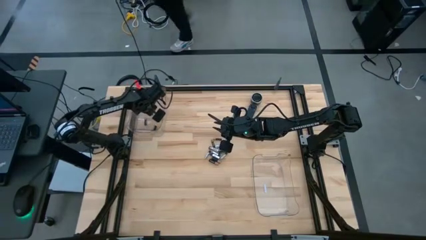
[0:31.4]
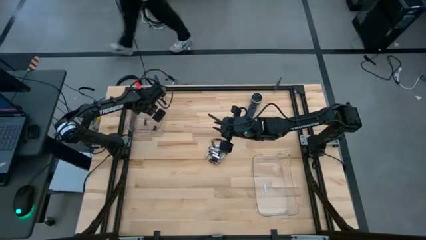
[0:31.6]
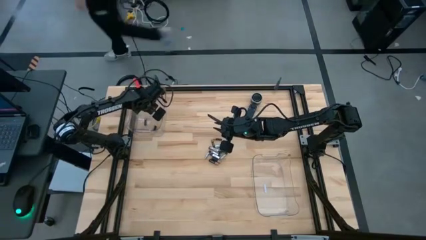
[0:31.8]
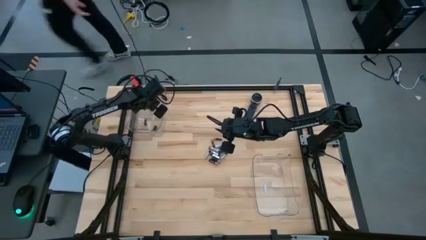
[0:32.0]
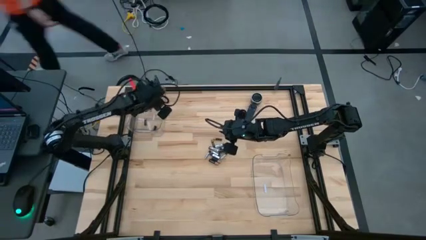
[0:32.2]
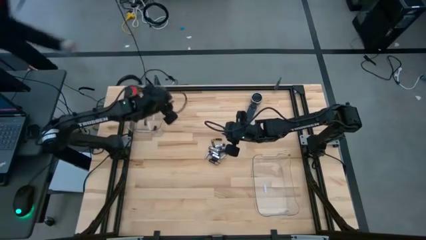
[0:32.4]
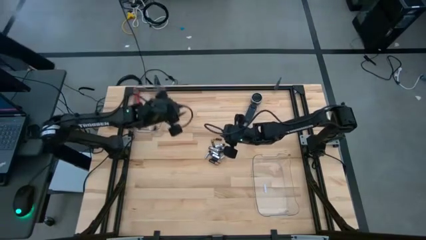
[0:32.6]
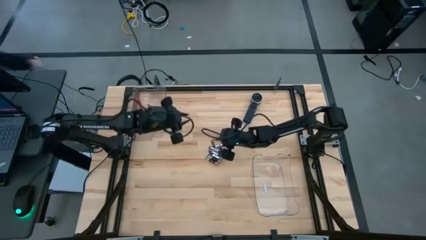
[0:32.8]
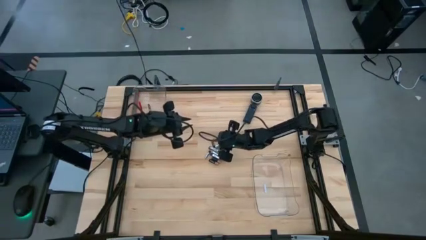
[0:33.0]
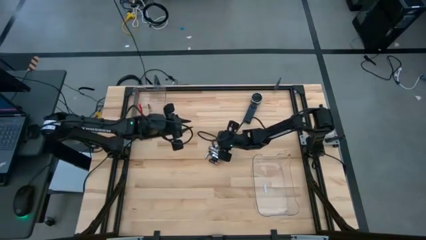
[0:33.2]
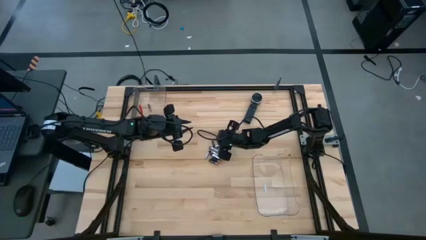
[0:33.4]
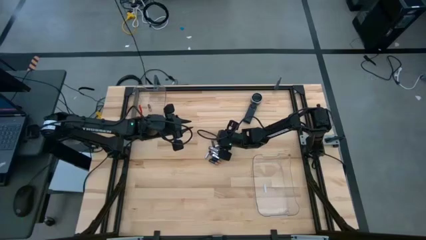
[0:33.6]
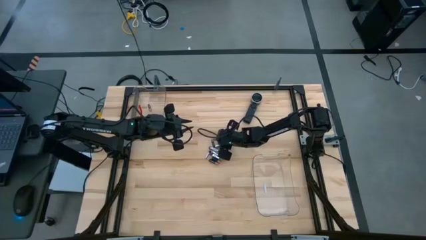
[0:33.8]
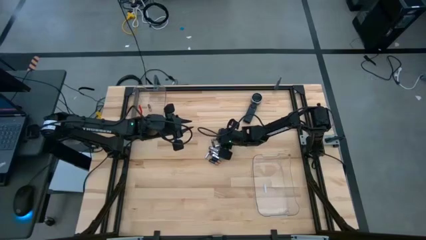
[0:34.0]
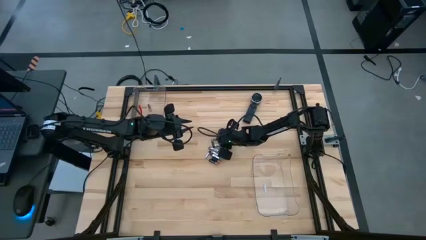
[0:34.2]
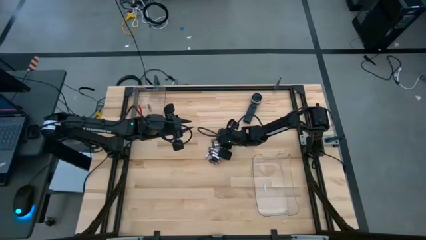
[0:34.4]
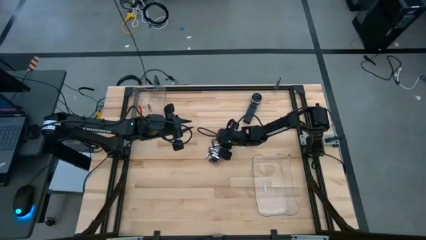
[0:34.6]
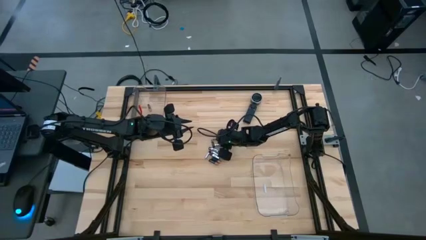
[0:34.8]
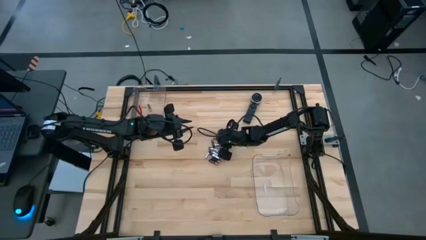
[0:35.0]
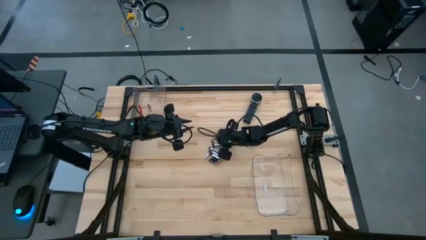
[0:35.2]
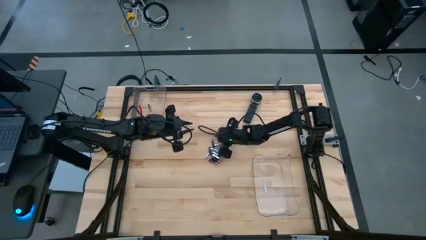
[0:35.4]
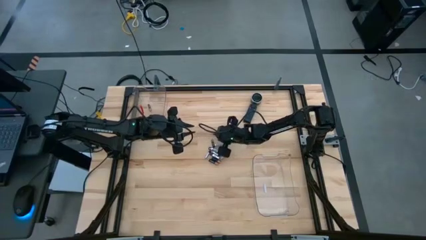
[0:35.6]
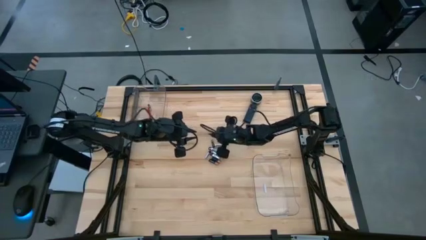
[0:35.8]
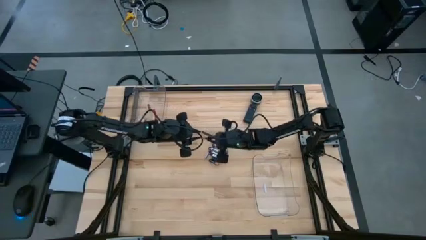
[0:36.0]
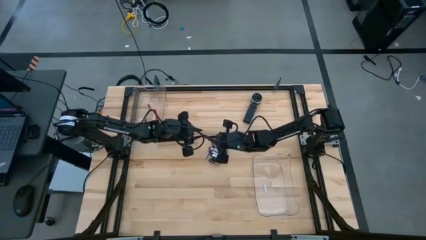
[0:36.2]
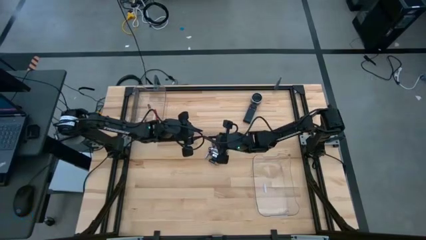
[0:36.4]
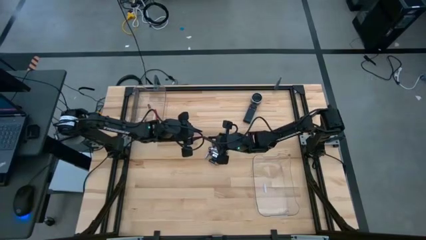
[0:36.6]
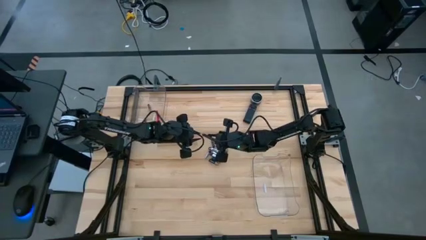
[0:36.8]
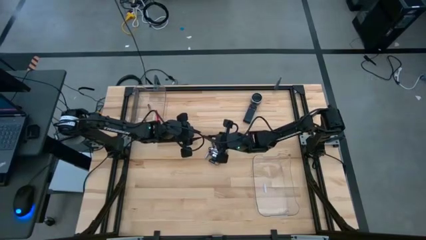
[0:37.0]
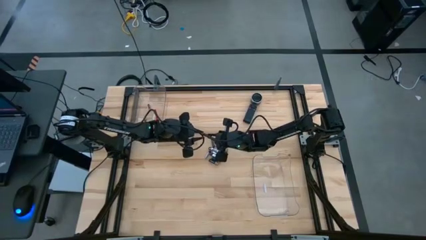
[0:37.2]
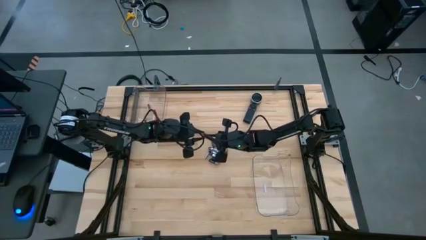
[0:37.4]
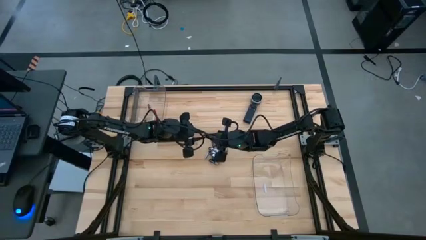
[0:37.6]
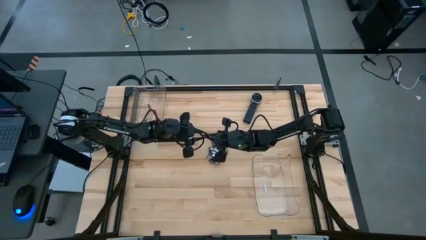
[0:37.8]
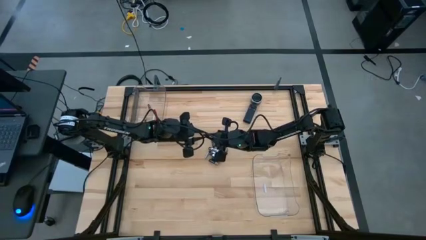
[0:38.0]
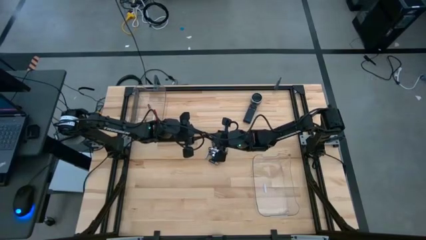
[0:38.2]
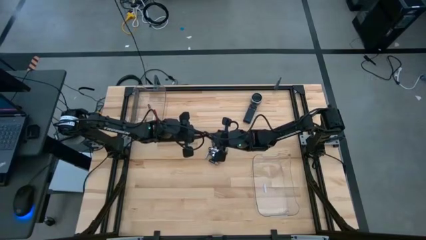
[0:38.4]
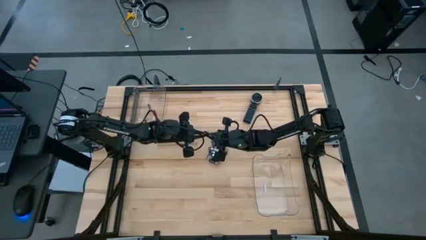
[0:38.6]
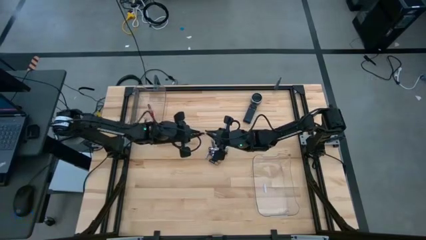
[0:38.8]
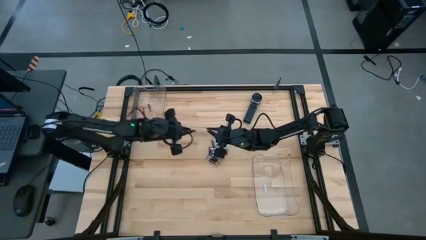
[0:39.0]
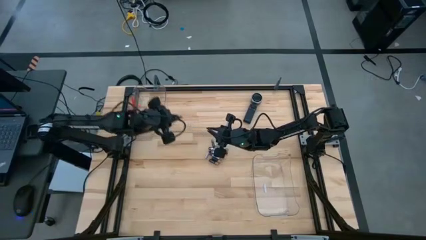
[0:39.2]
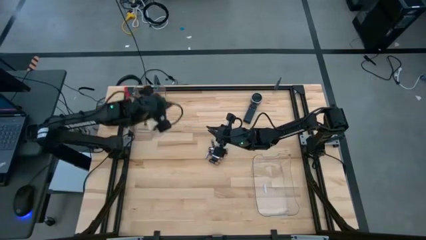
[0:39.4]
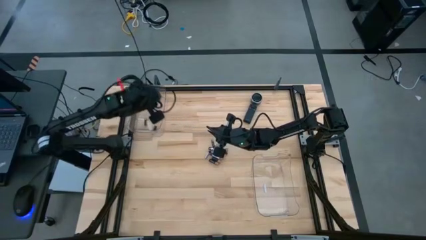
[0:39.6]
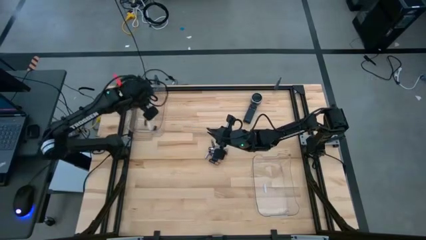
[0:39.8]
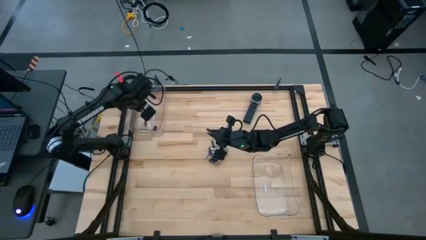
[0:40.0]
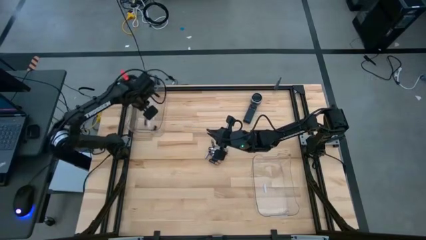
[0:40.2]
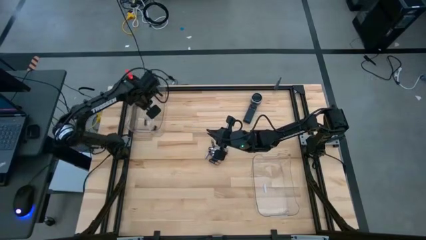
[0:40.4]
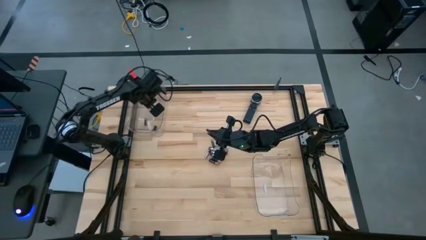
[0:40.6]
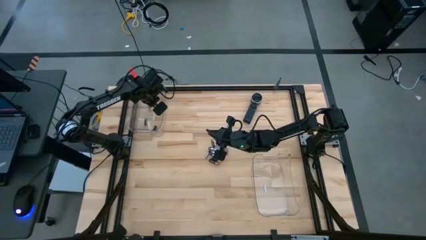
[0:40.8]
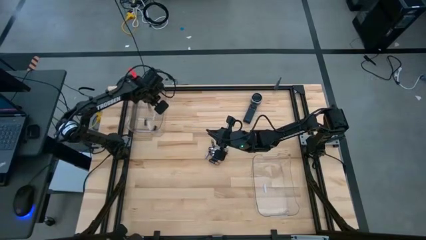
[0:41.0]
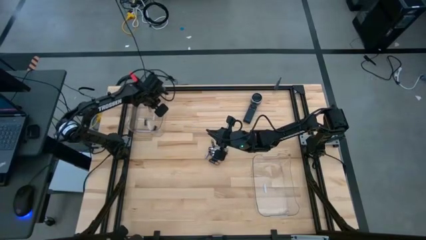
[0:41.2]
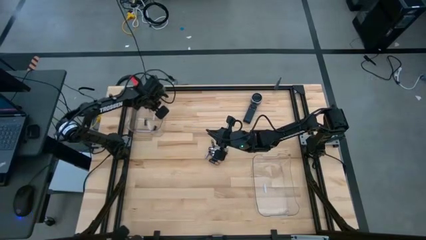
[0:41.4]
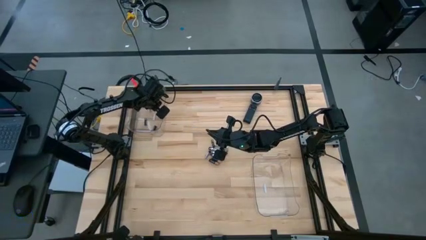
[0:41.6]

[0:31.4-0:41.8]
Task: Sort batteries
Put the black battery into the top transparent bin

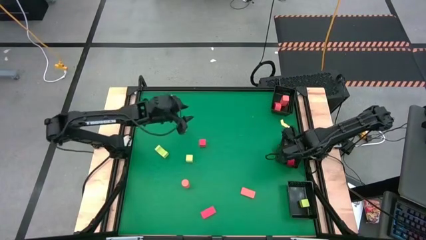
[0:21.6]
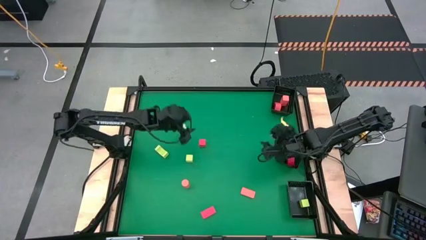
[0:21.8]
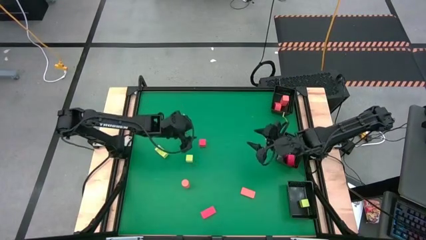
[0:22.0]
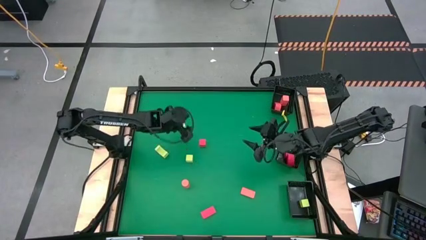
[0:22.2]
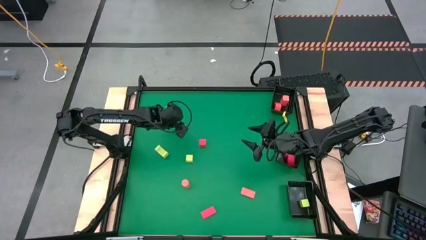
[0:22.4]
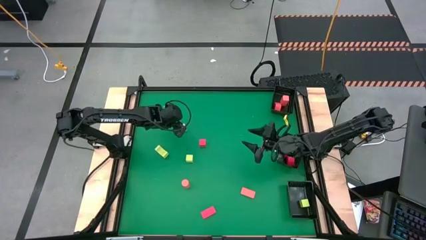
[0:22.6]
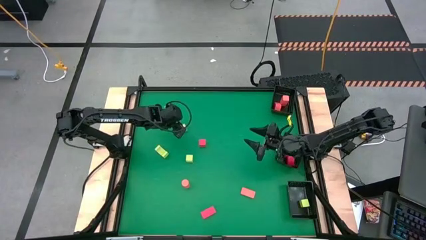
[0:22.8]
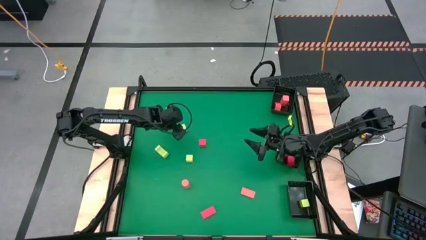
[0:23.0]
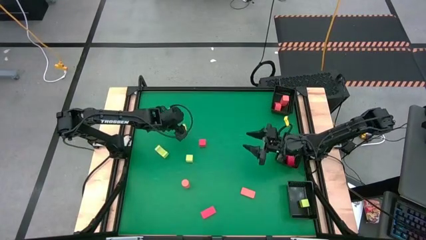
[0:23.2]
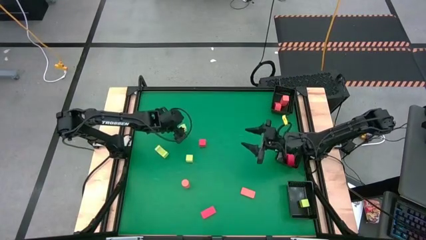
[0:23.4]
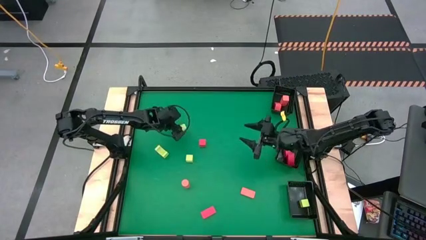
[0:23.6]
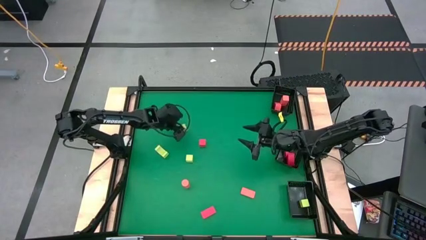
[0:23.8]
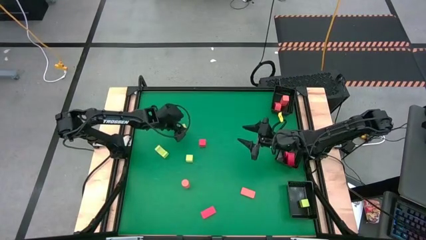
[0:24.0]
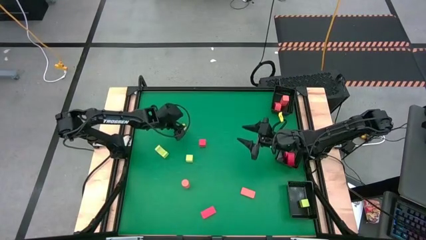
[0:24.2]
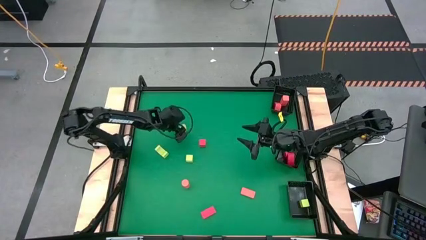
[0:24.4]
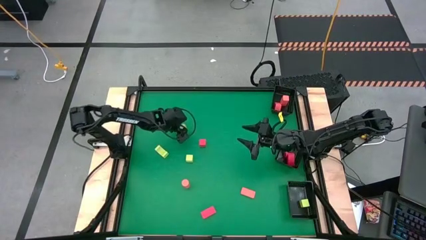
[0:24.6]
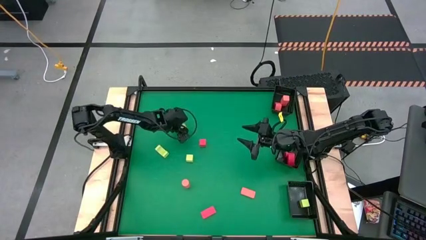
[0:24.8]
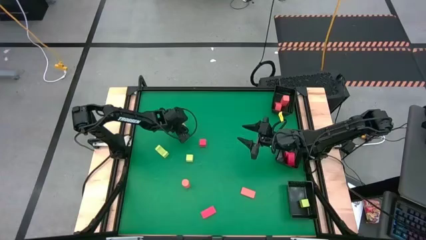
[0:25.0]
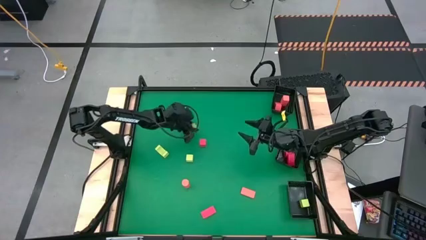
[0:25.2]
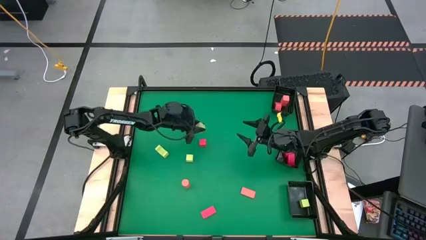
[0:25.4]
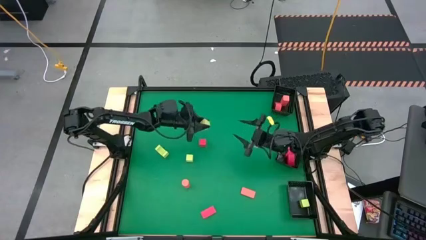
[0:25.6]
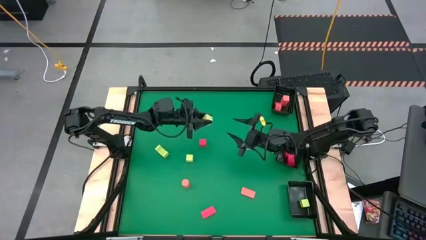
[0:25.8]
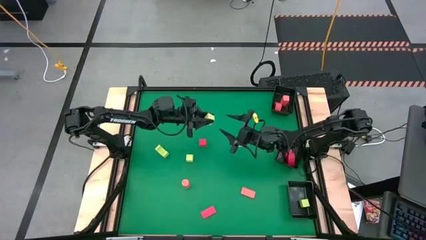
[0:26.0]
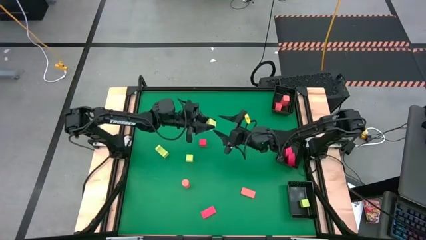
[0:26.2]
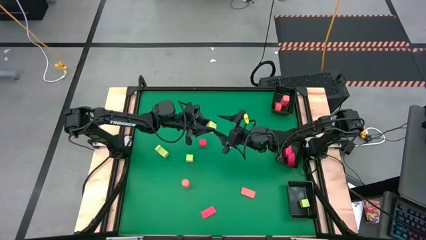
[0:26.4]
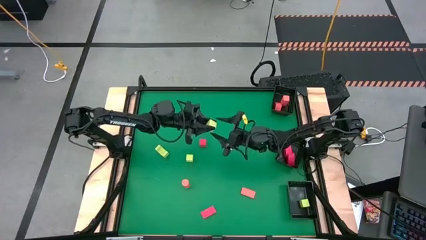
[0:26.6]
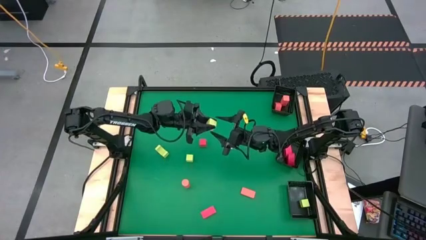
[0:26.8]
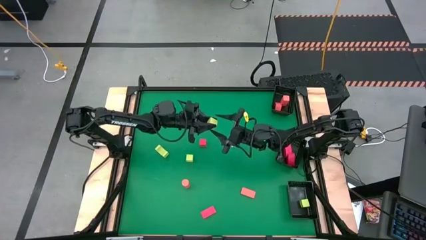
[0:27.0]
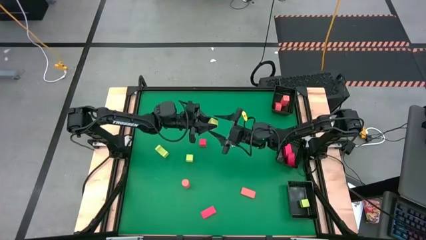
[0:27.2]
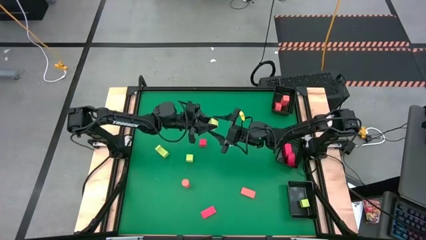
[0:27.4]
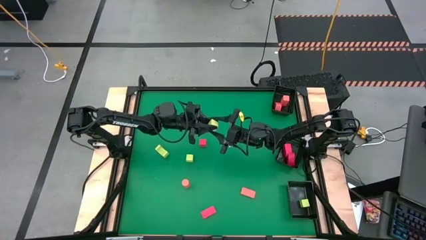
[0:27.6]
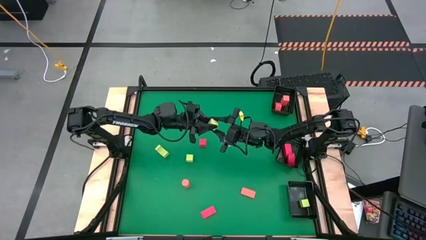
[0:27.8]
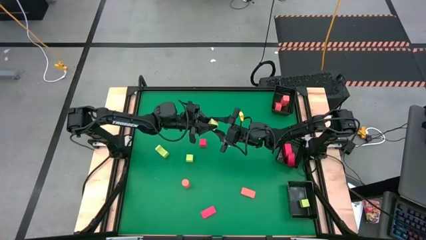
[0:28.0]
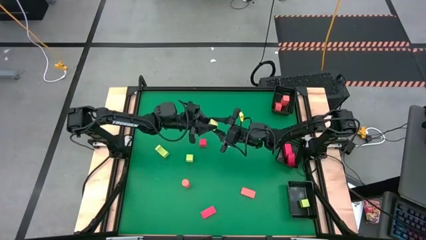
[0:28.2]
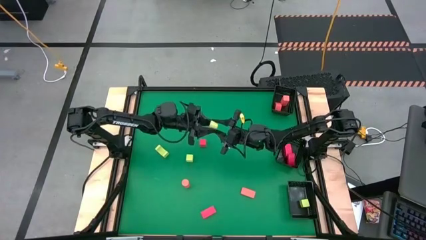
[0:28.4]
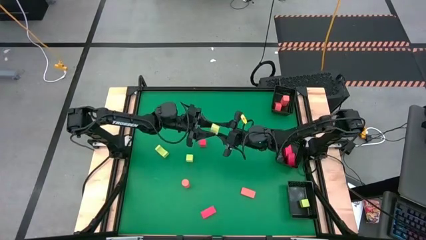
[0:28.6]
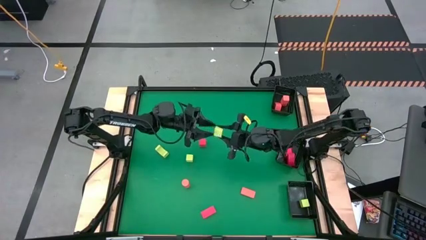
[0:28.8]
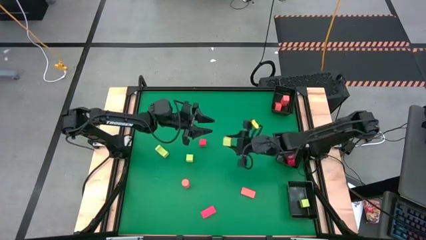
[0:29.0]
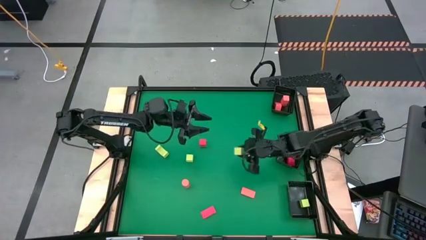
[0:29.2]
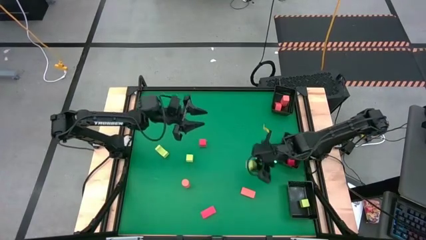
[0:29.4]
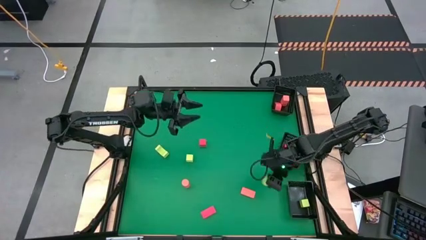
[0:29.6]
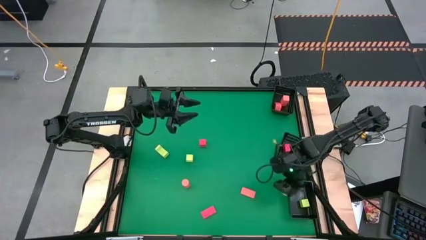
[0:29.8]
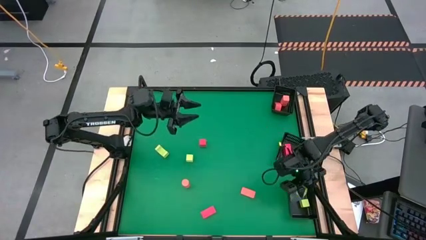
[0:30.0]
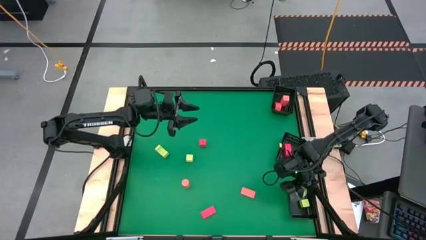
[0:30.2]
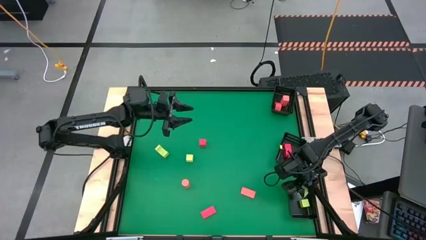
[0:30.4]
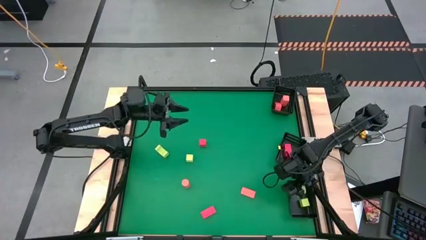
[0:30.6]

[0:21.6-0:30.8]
Task: Sort & place blocks by color
Put the top yellow block into the bottom right black bin
